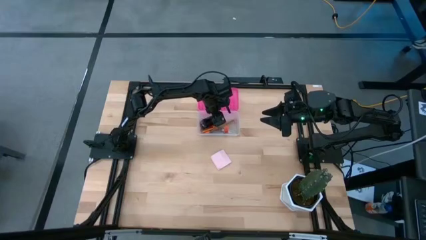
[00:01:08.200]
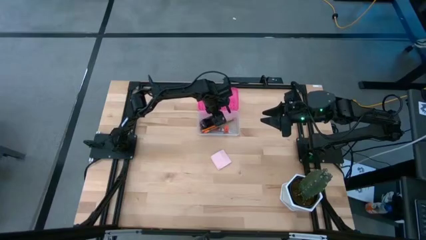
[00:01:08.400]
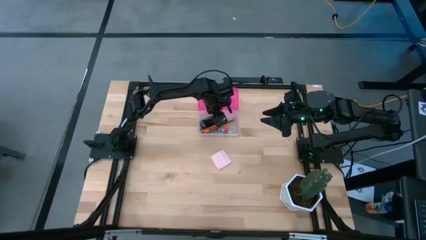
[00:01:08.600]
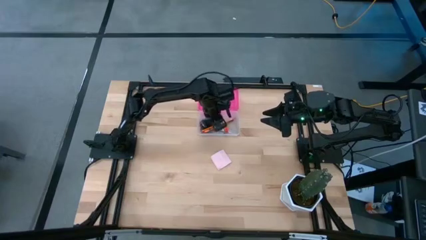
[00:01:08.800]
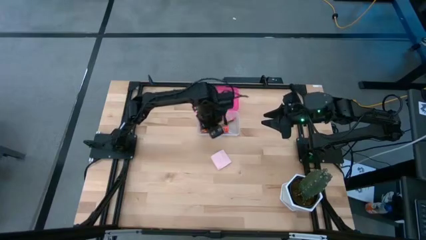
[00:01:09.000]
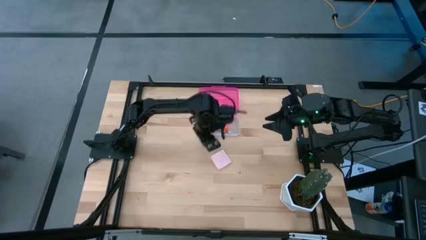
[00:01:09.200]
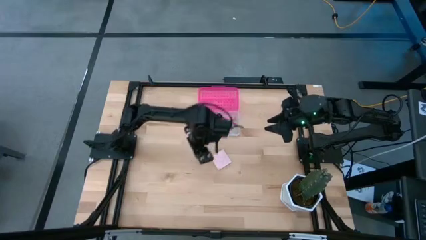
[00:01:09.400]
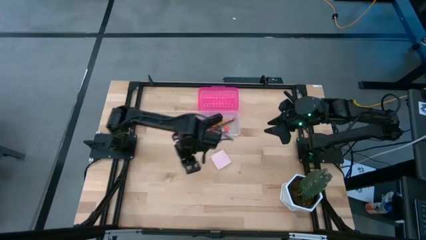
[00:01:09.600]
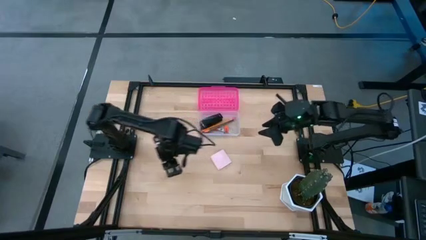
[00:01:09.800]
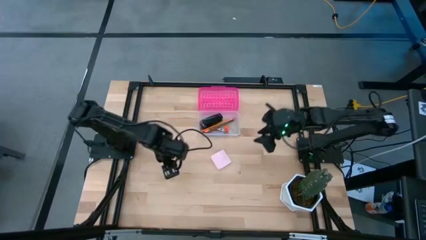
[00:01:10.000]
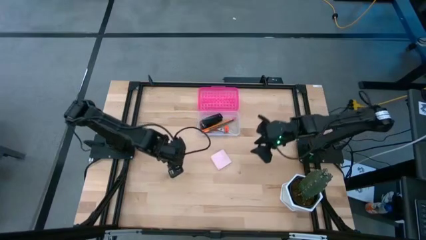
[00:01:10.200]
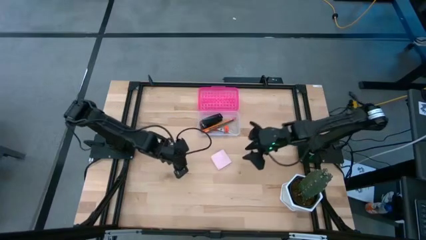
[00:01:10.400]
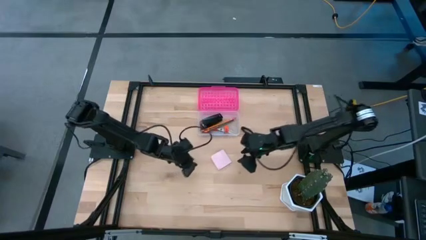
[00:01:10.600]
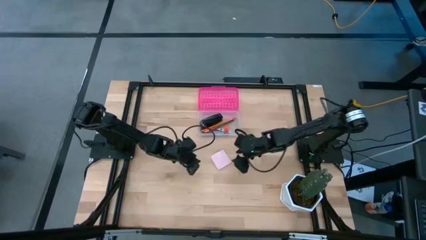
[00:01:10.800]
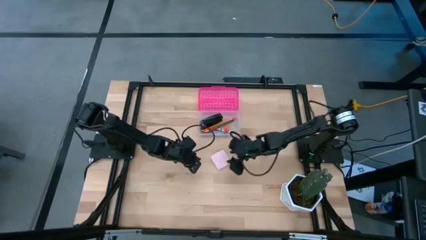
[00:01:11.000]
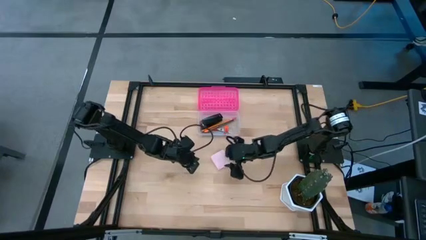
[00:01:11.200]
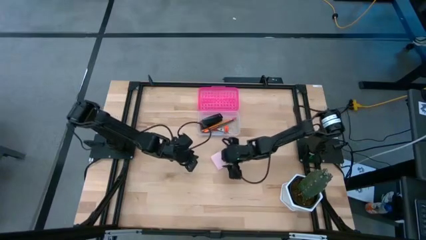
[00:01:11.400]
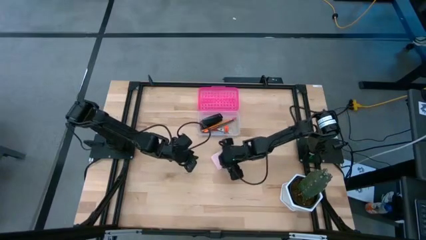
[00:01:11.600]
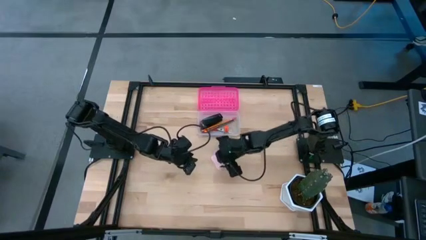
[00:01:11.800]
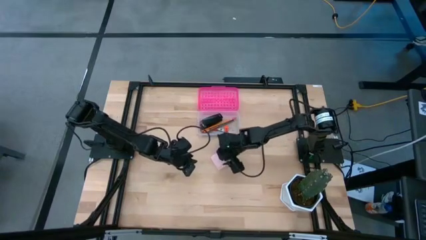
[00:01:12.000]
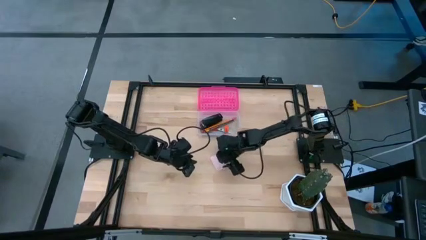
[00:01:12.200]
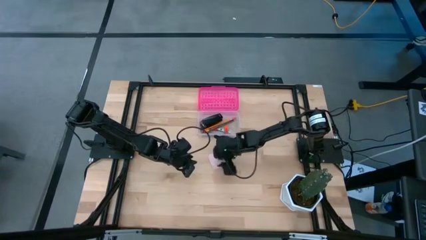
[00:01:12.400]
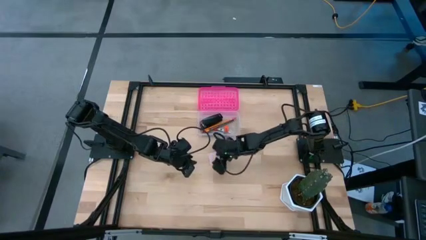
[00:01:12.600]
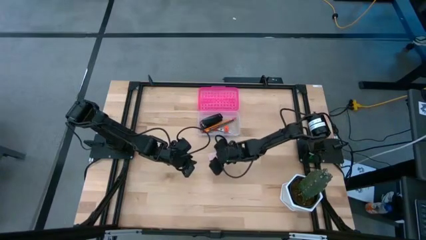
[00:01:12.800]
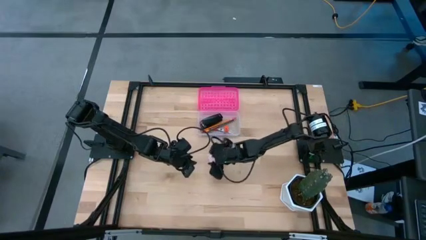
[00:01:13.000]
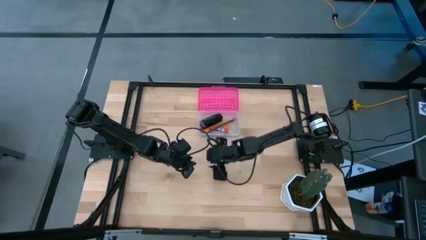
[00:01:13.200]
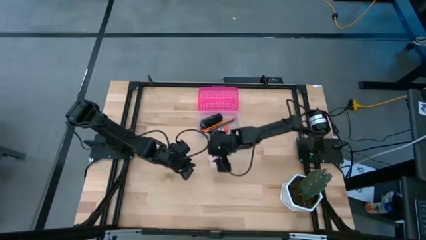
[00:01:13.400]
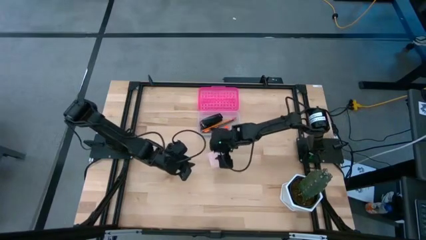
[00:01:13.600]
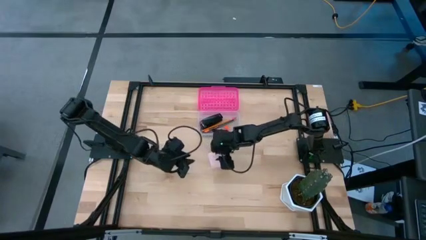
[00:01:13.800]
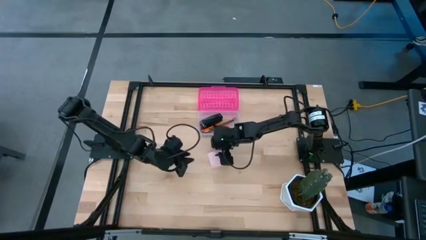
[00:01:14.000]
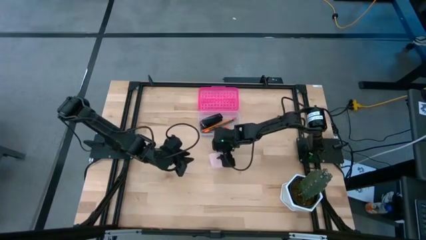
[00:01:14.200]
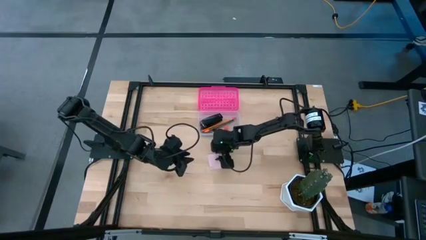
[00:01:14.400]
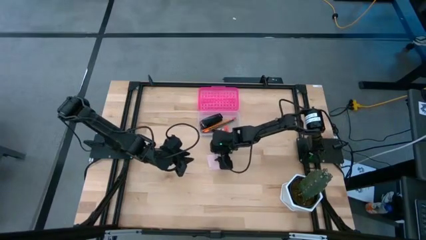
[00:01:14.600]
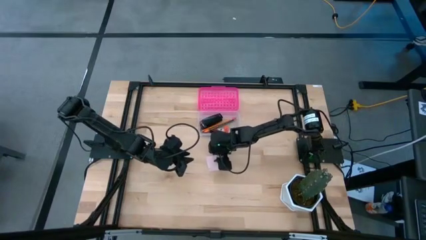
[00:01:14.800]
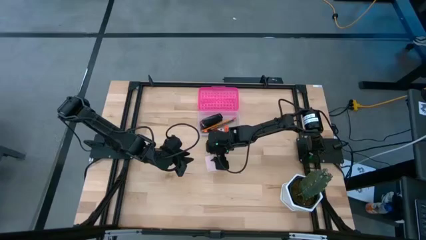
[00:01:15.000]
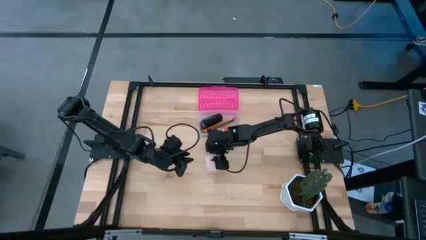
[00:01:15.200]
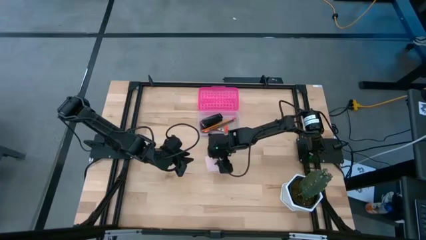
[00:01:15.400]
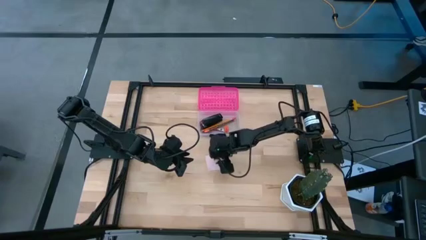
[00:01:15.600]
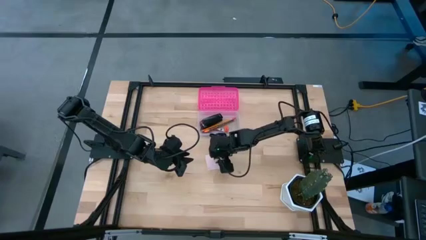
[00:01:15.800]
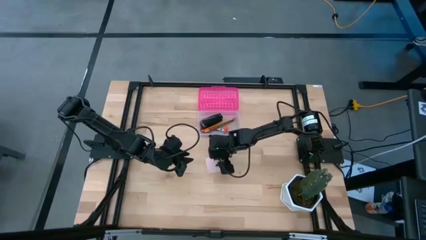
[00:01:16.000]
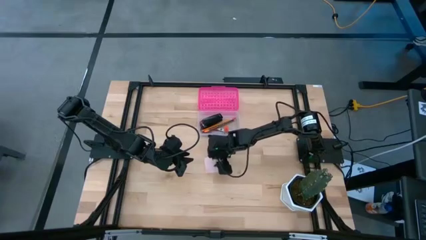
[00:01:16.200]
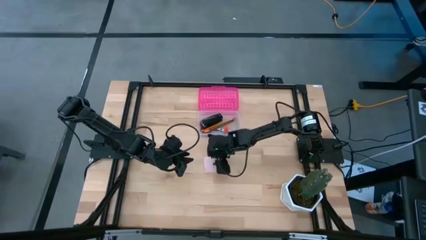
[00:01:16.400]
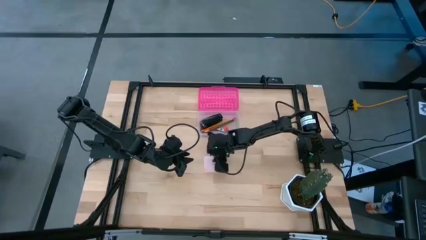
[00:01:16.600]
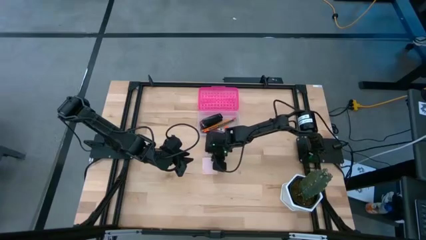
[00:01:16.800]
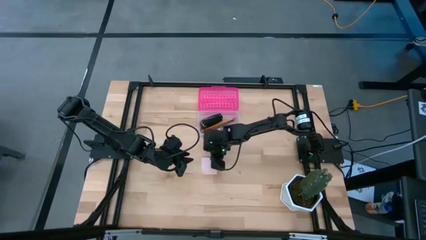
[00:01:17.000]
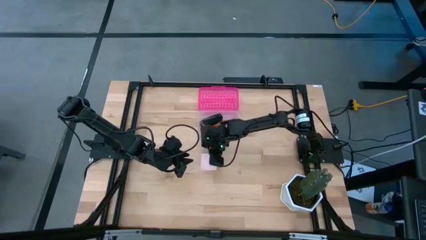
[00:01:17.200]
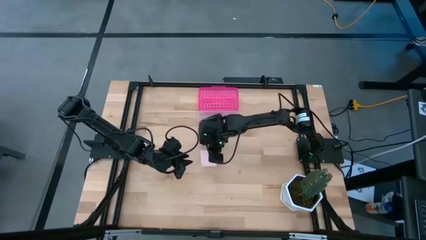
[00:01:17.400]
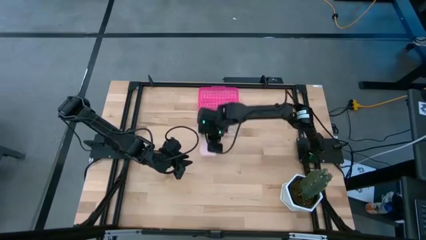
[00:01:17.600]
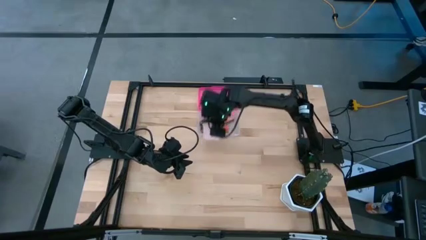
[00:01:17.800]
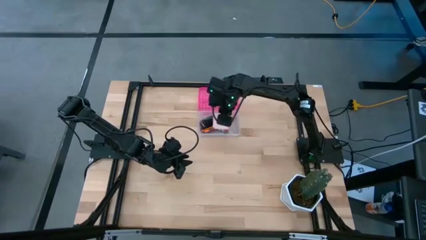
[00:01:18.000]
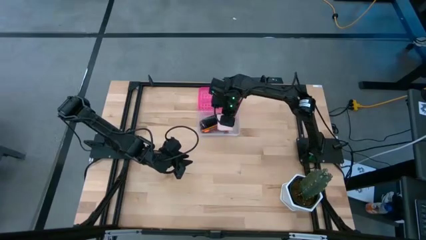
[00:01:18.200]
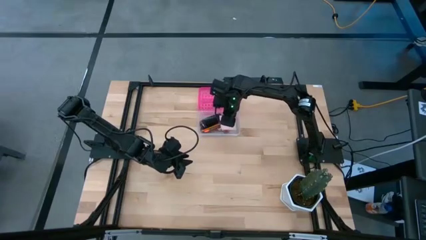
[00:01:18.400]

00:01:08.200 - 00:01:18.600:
Task: Pack school essentials
Put the pink sticky notes into the supply box

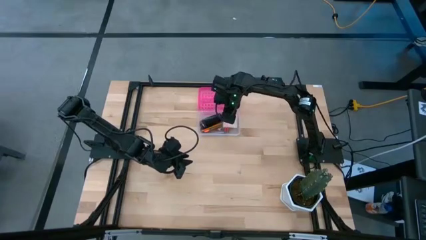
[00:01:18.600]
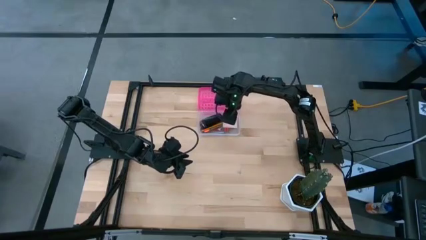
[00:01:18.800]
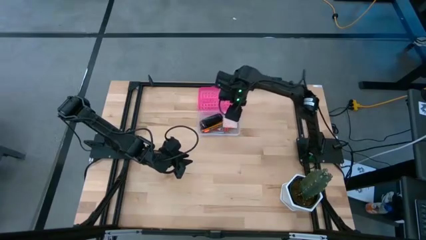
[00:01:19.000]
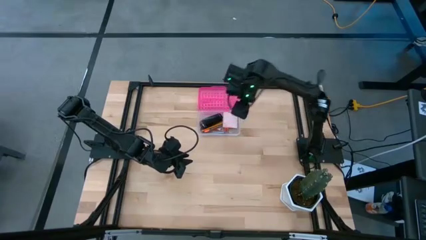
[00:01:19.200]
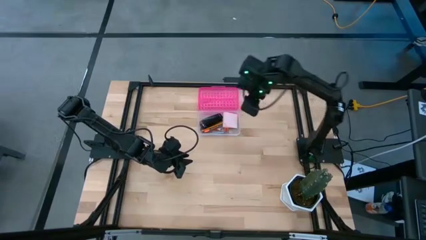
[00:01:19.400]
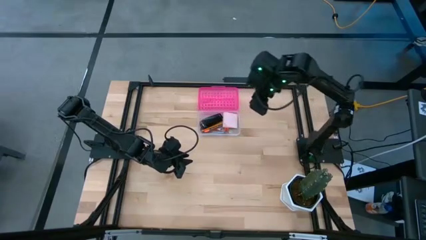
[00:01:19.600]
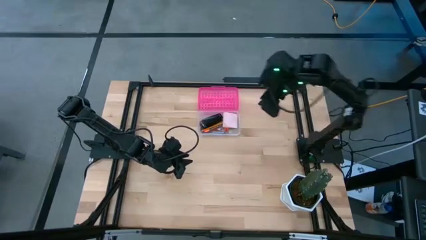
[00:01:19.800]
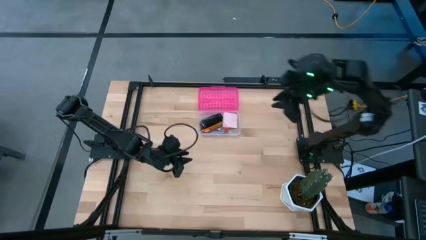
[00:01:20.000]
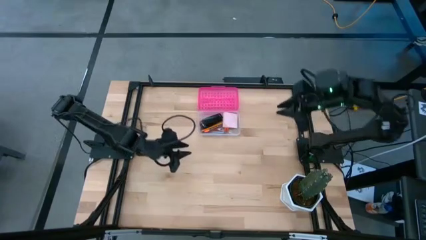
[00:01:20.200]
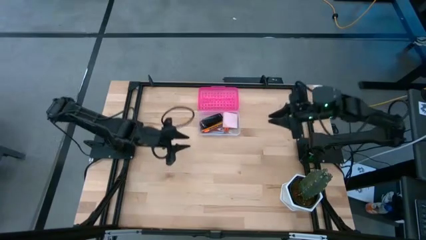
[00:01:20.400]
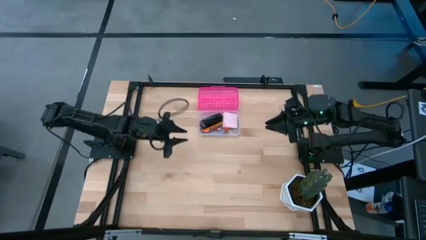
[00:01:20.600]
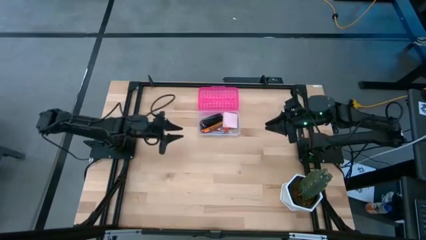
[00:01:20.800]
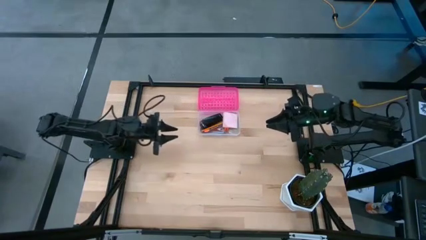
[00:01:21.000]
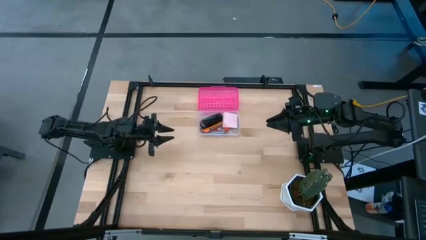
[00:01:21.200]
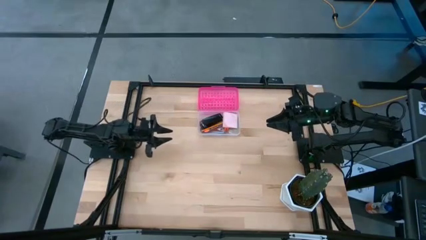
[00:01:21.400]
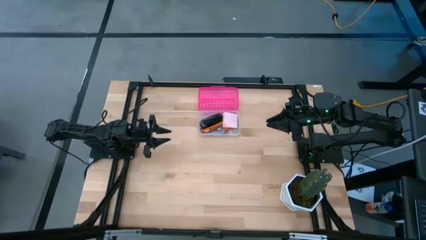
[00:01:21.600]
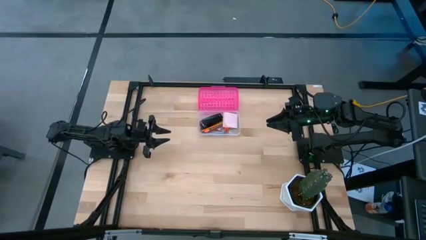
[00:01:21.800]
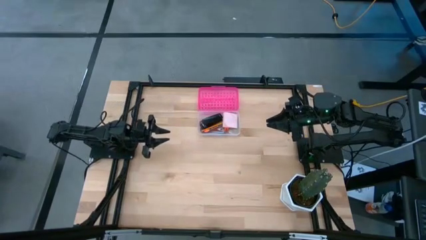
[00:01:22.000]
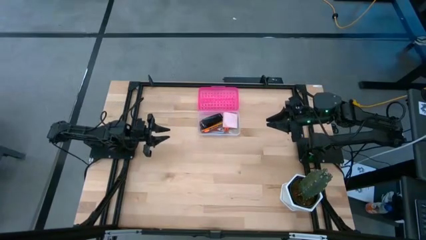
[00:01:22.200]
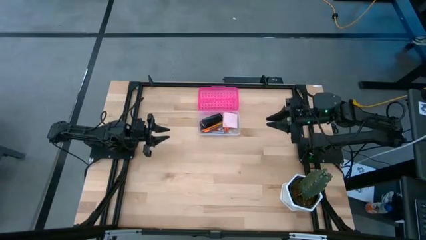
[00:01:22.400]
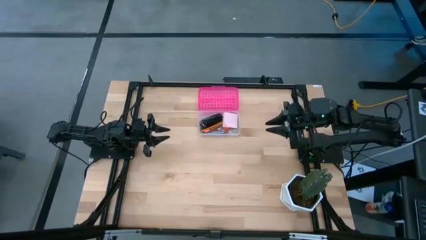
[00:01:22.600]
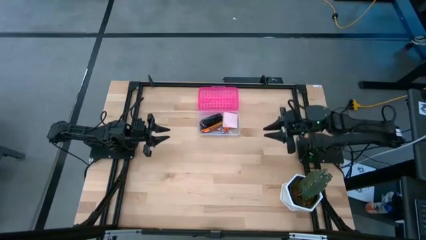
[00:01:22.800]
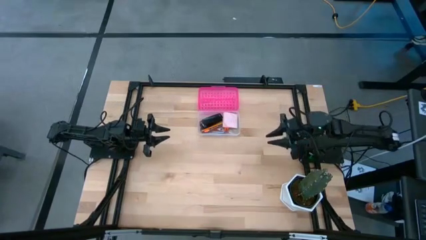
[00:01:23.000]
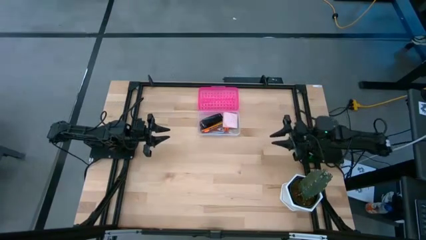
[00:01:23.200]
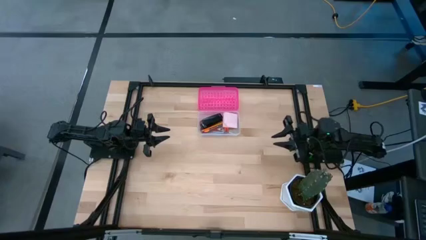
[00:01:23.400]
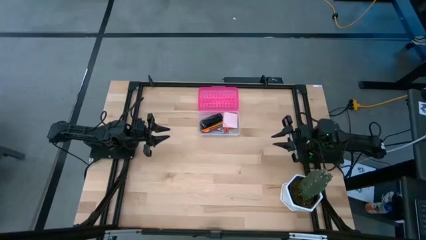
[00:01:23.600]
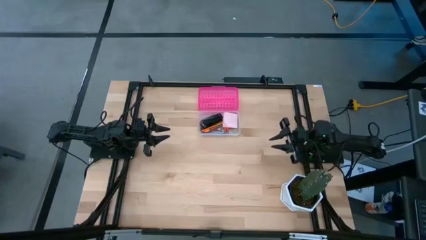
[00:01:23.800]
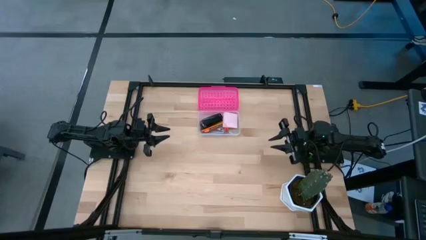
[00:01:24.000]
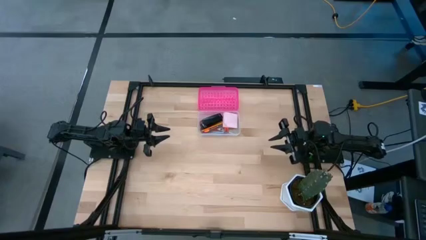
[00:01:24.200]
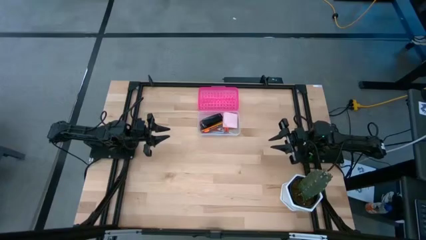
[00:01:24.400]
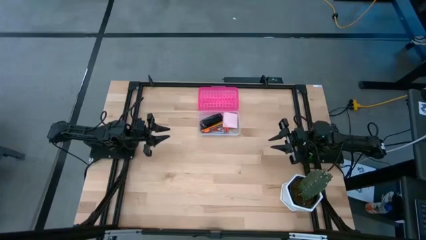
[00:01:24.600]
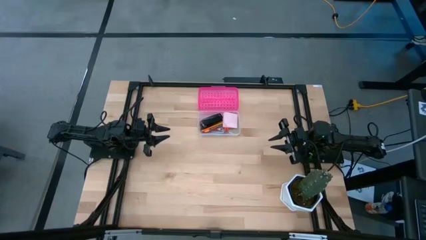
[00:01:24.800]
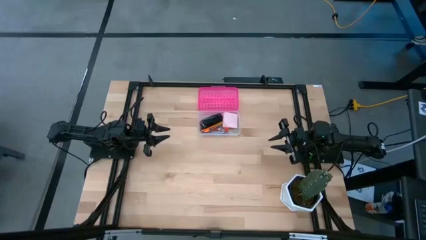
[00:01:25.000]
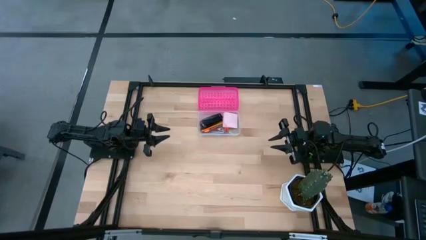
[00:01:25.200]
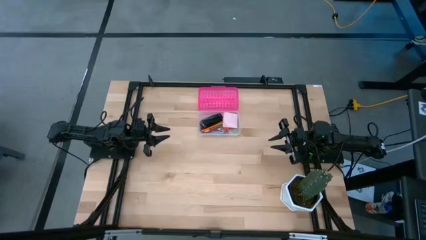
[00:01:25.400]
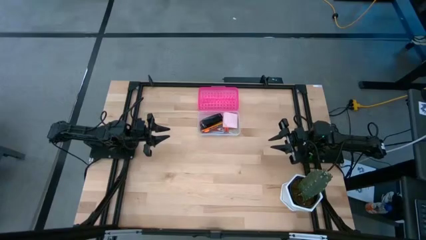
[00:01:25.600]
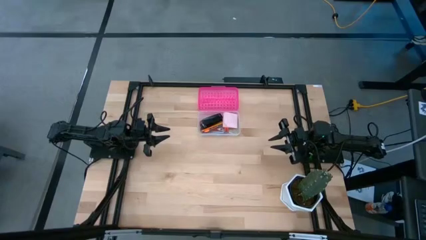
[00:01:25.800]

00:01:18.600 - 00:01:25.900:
Return to Home Position
